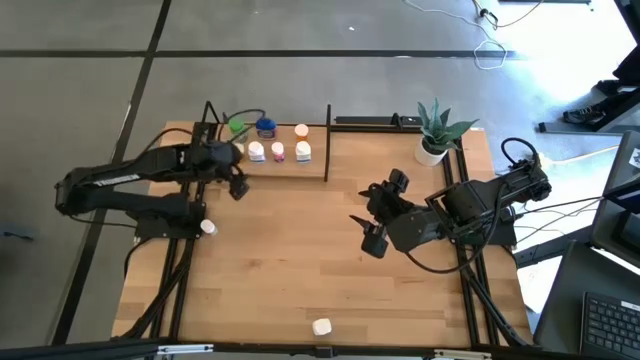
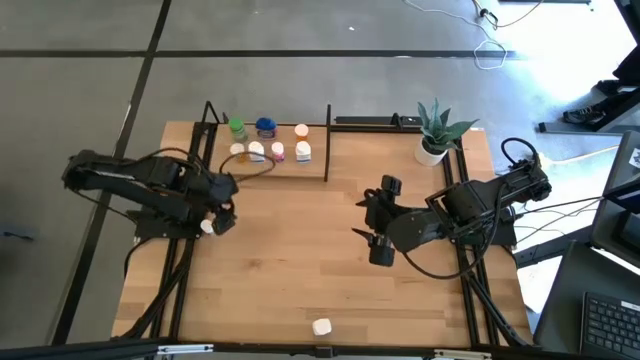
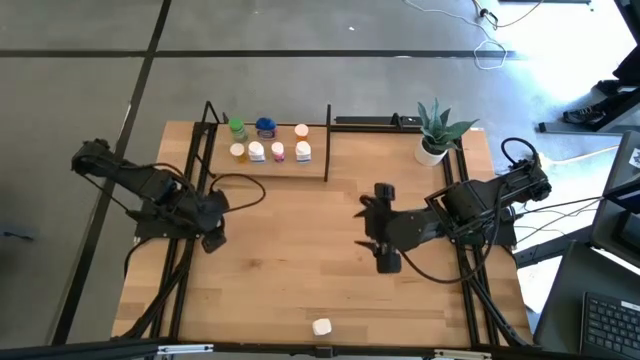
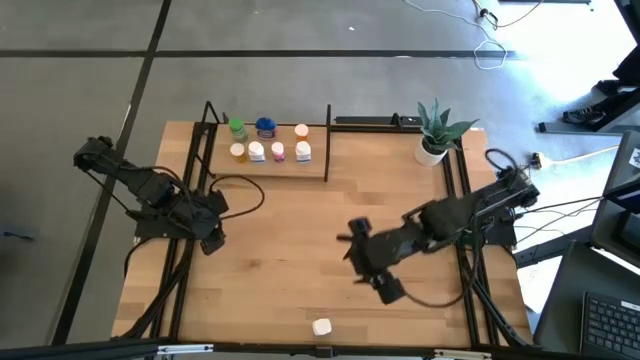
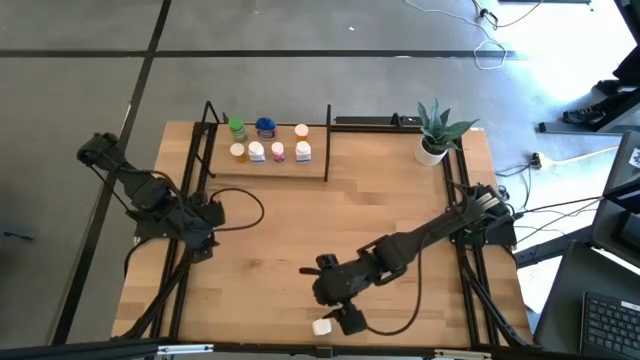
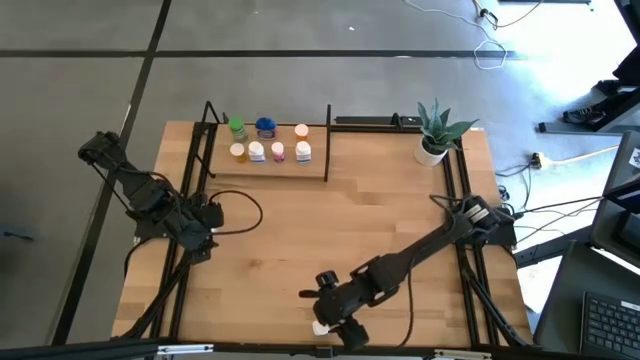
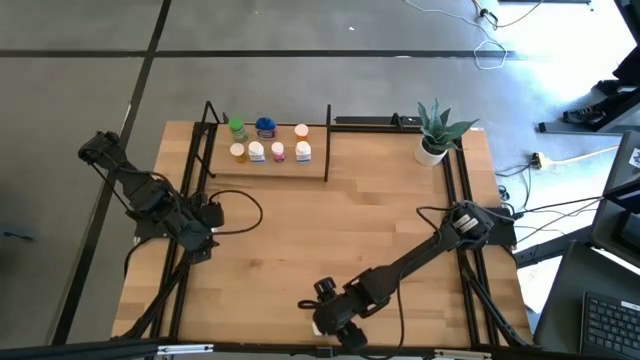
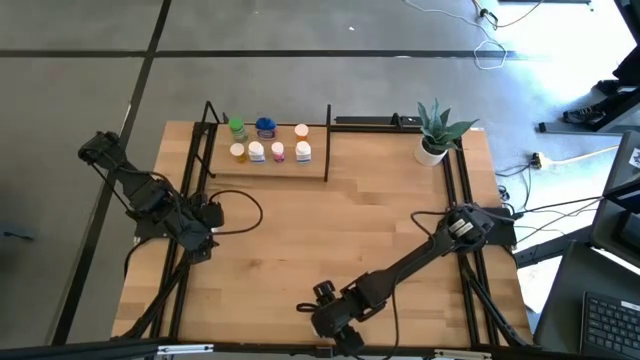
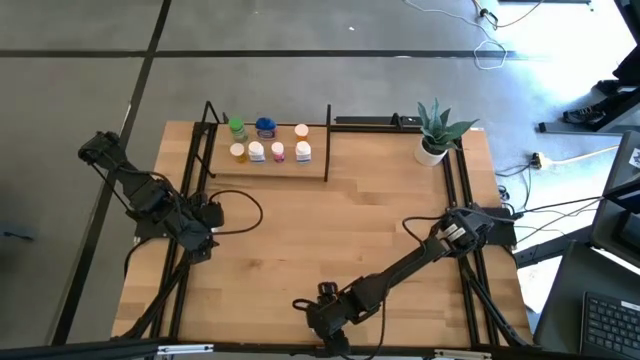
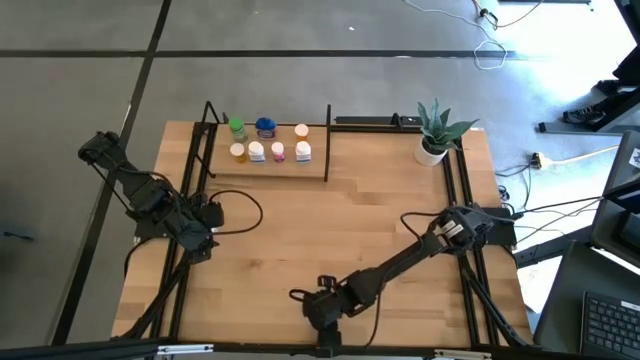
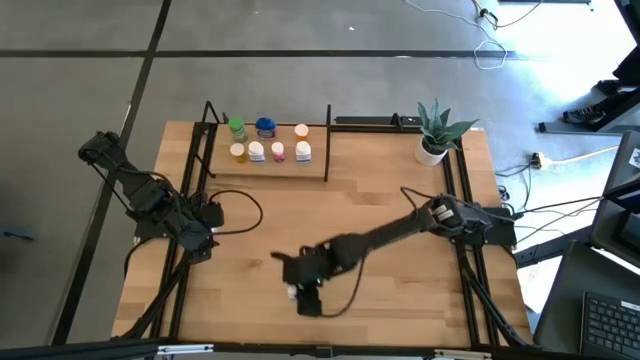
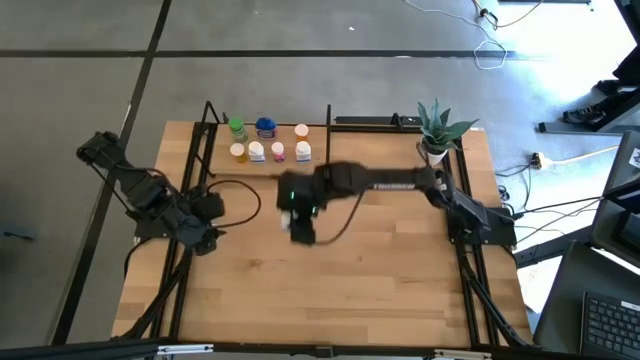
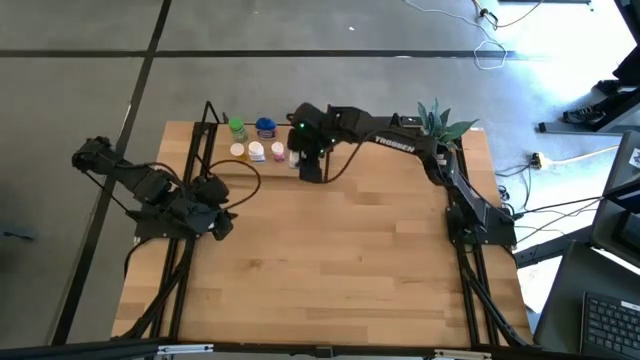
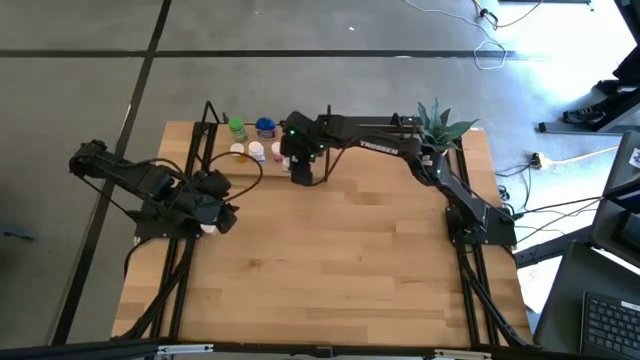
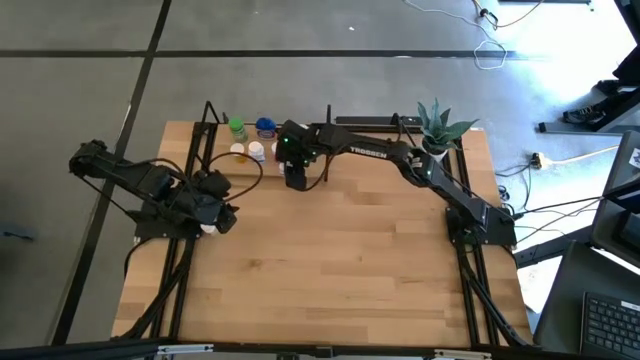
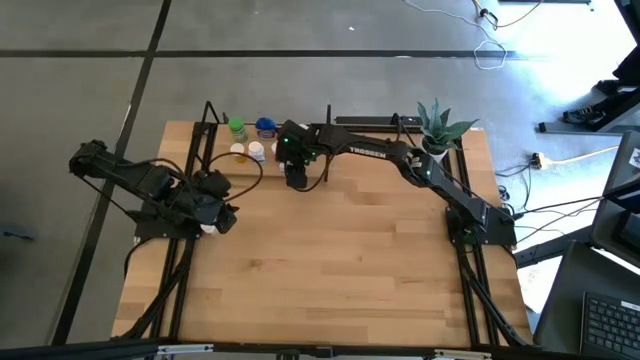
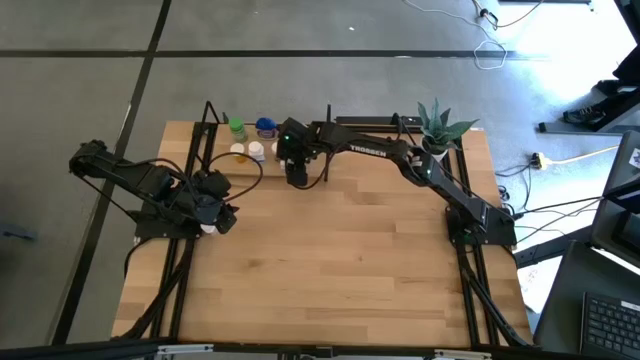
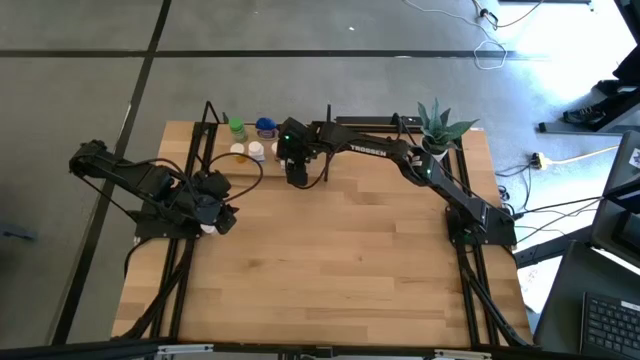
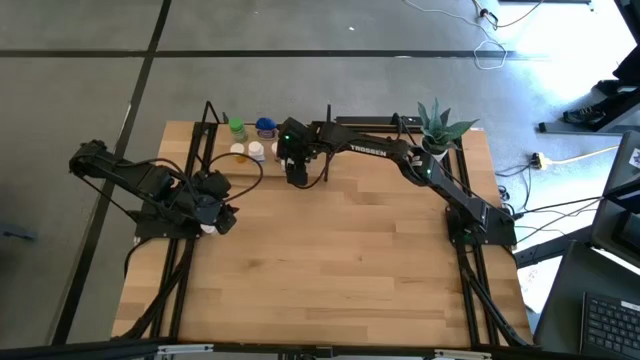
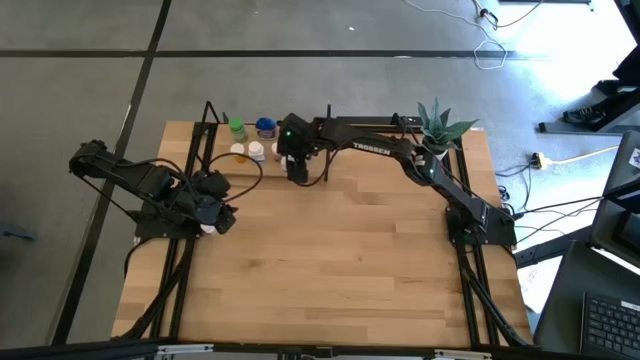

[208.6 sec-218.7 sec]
Task: Pick and place medicine bottles onto shelf by color
Put the white pill bottle on the shelf

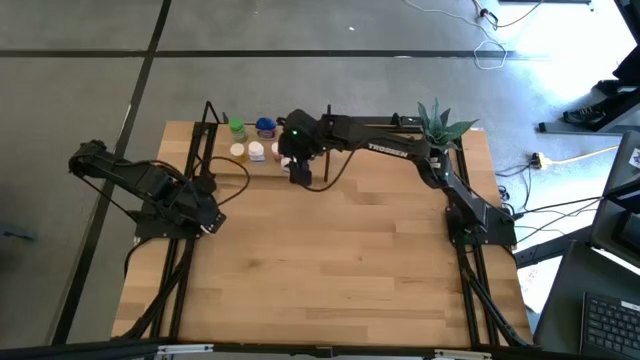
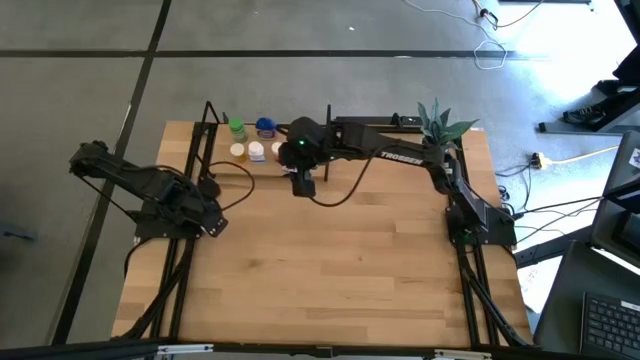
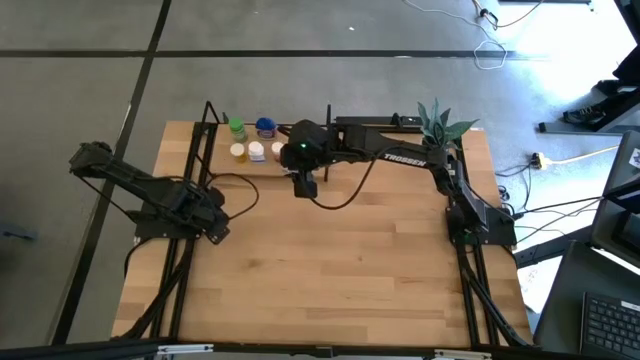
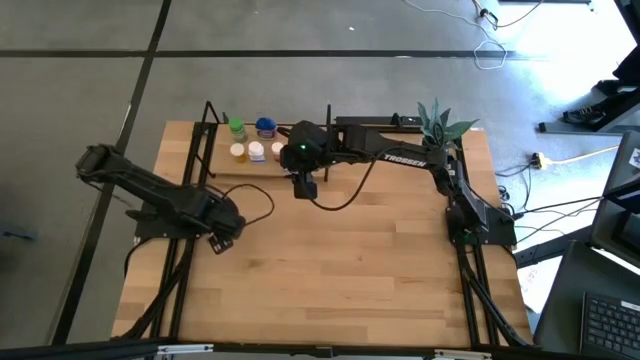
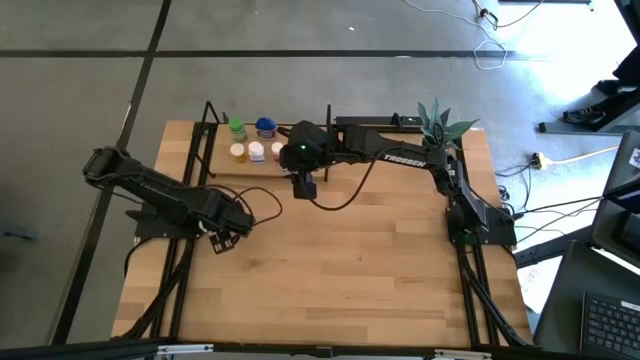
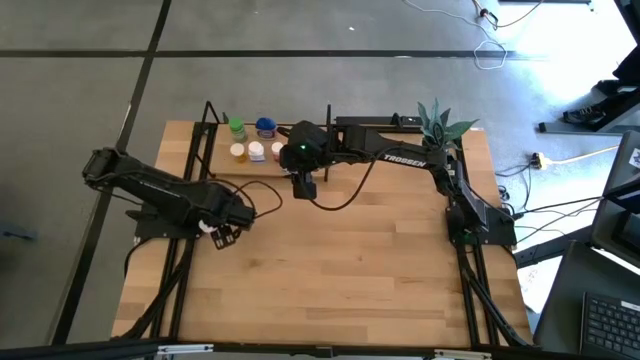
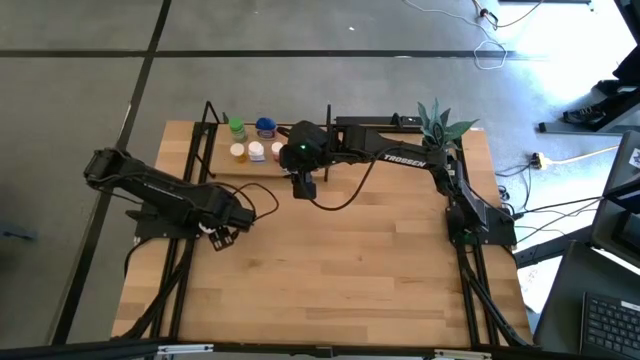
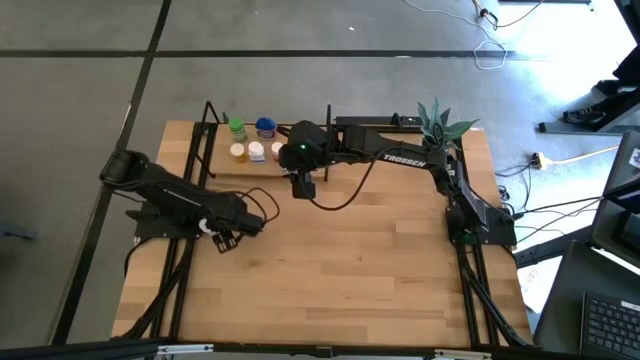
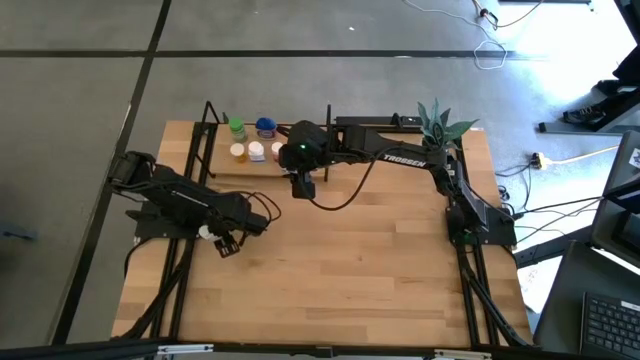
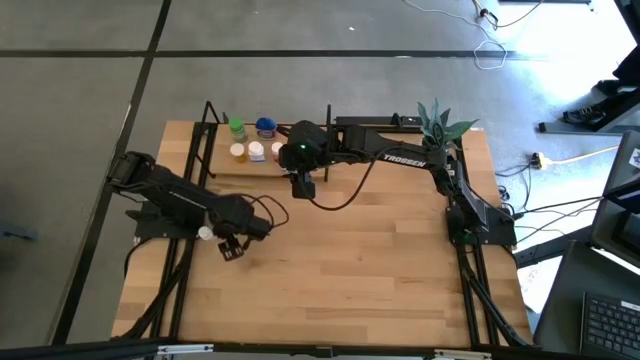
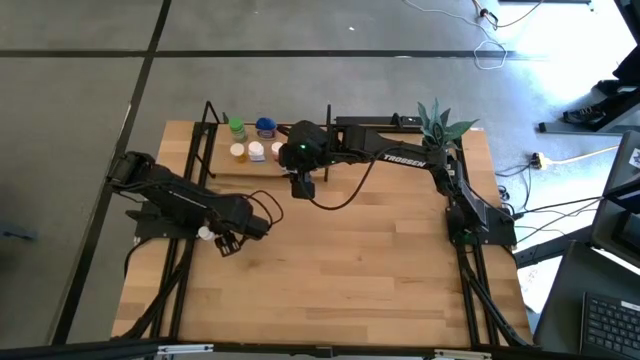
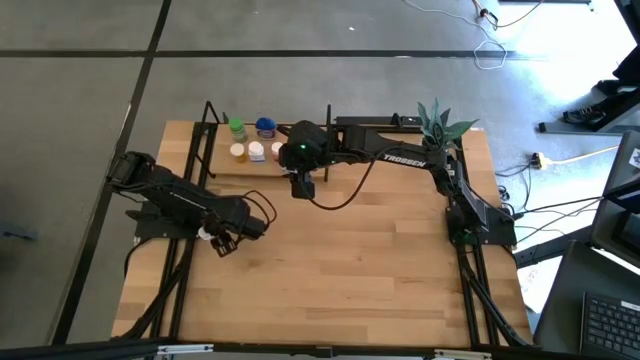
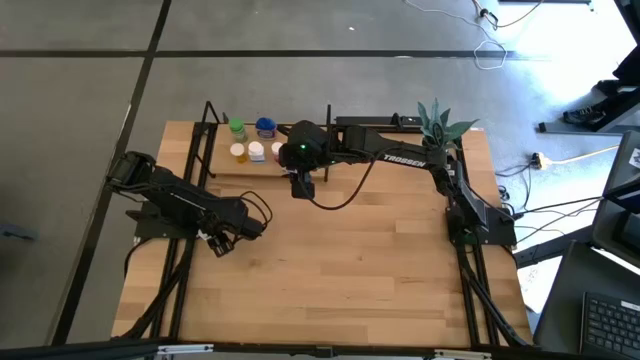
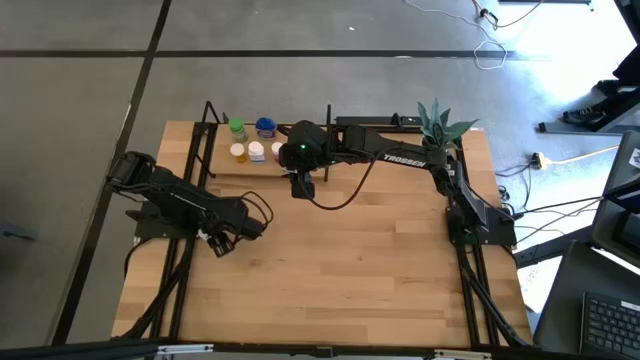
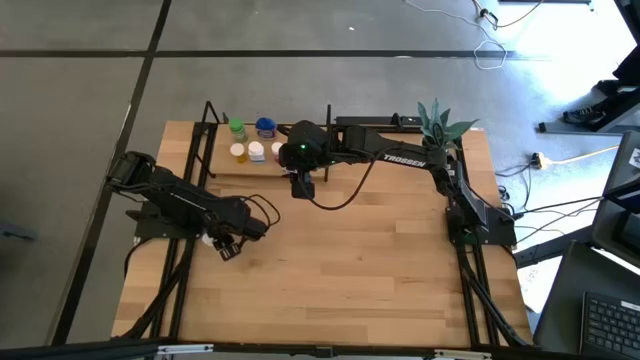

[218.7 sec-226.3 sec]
Put the white pill bottle on the shelf
